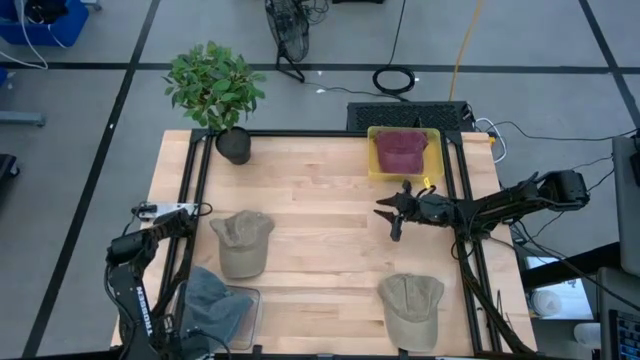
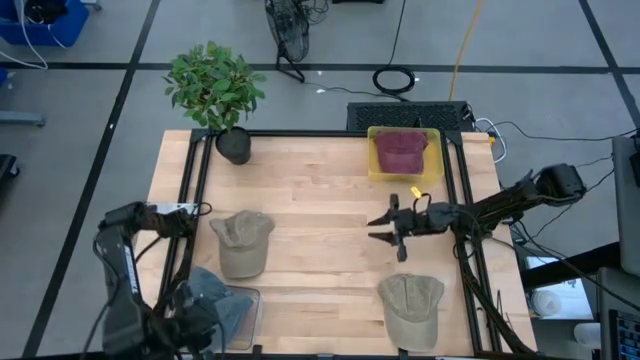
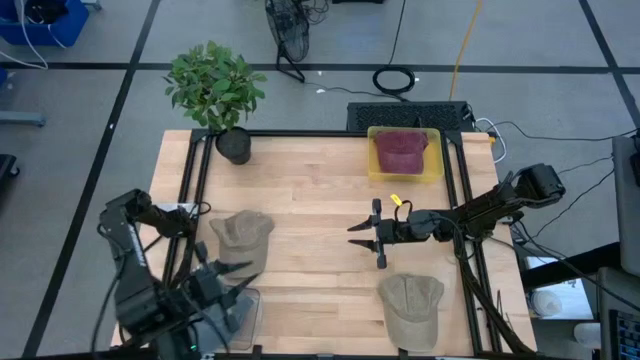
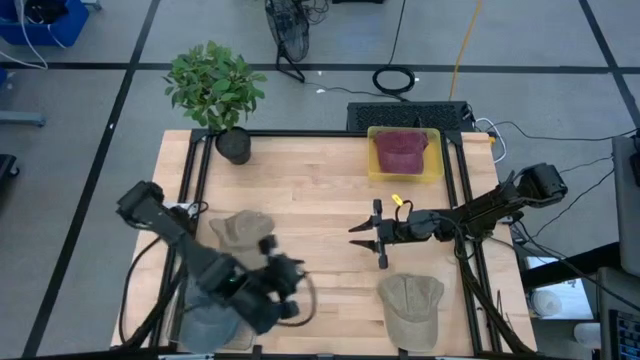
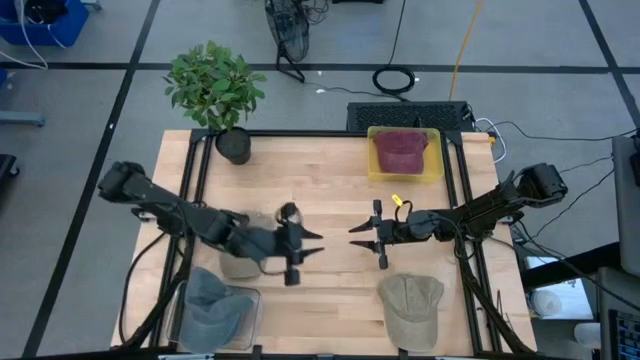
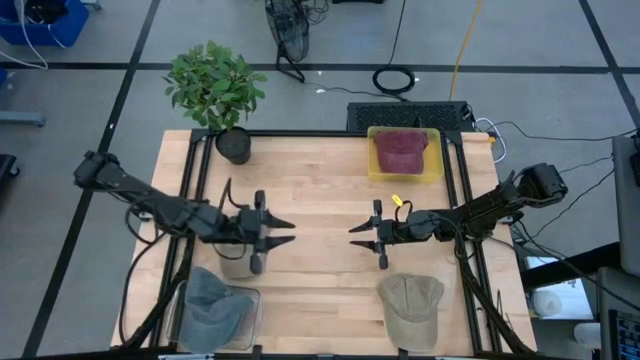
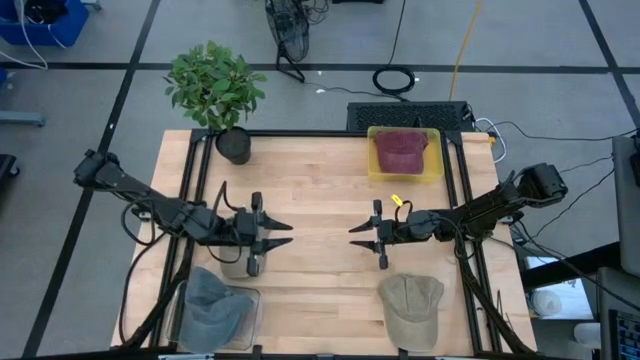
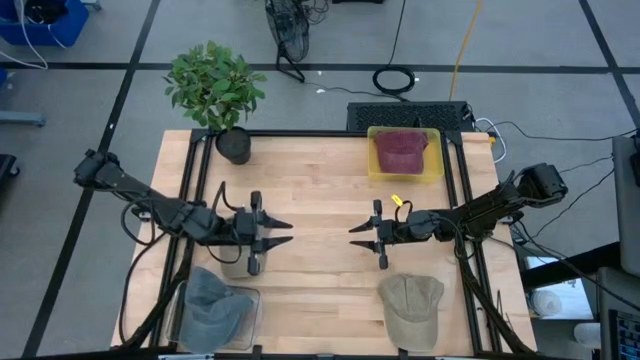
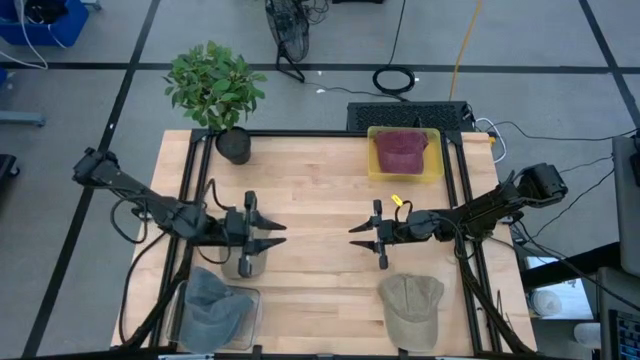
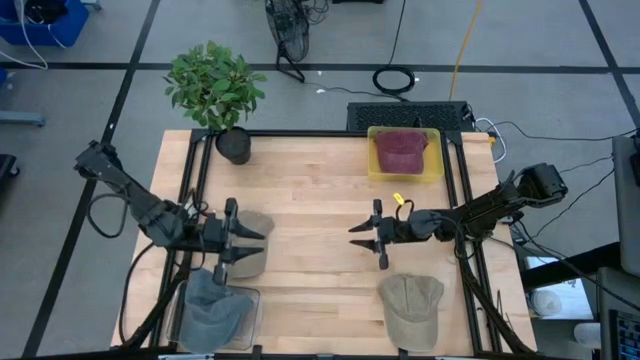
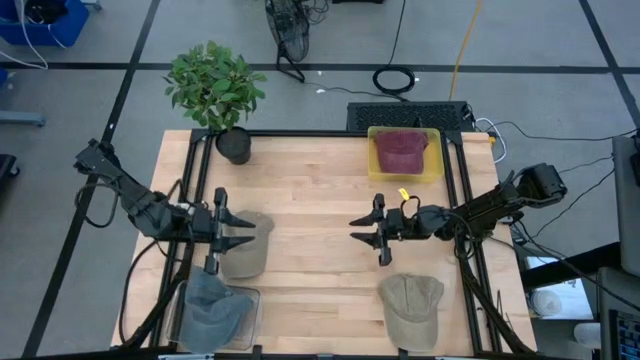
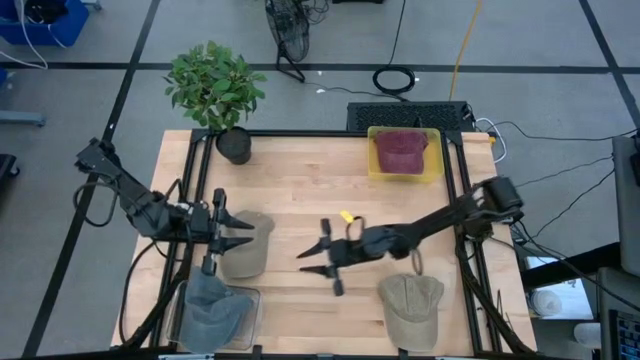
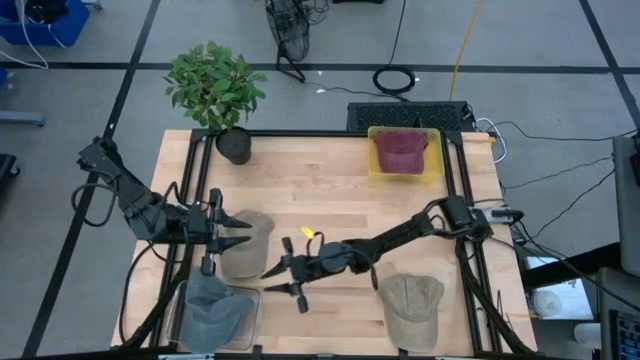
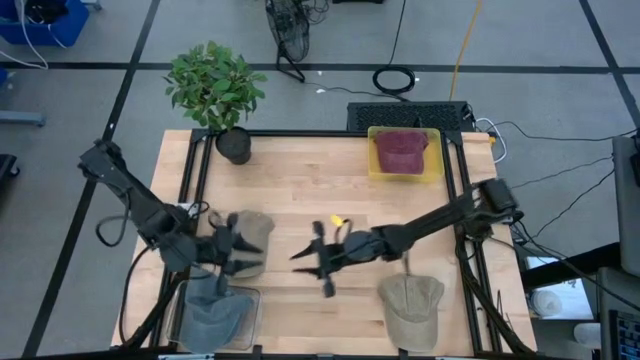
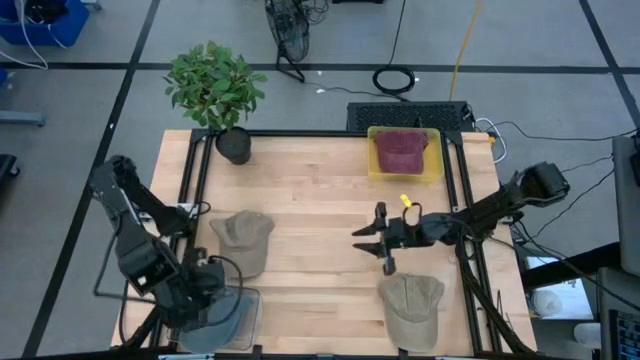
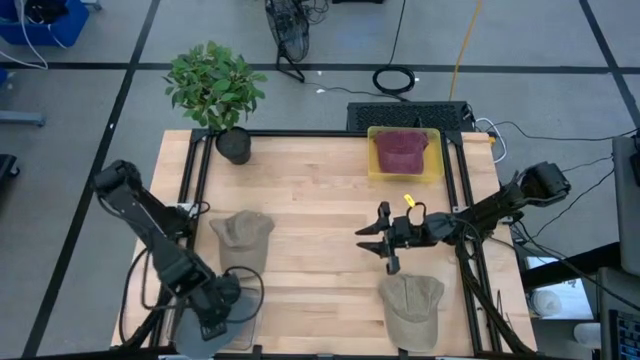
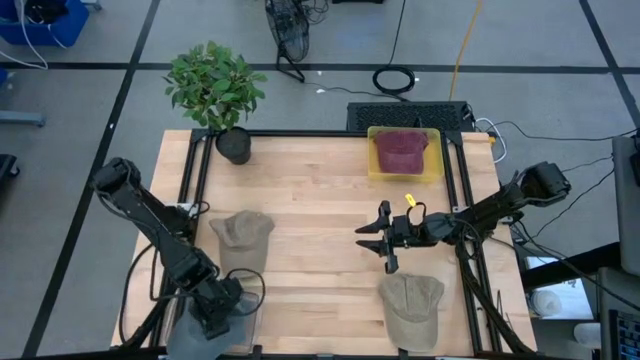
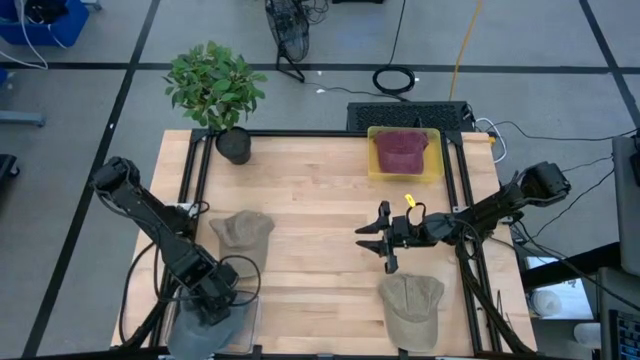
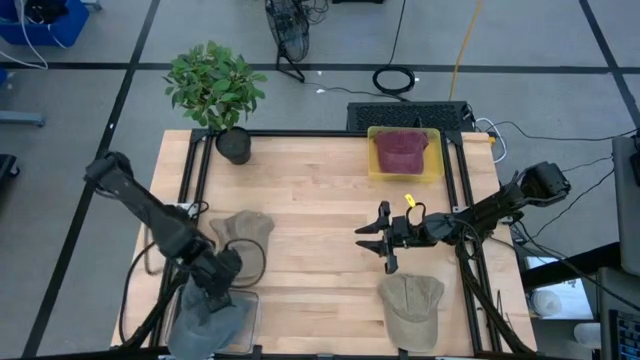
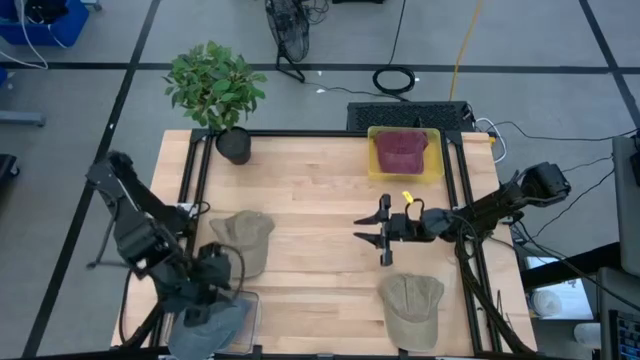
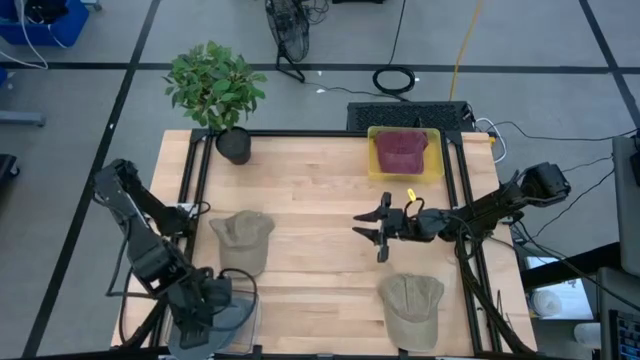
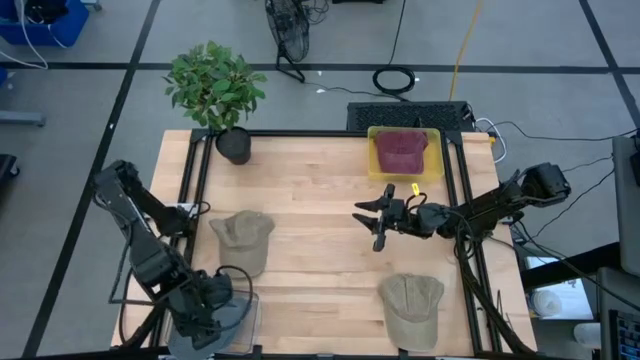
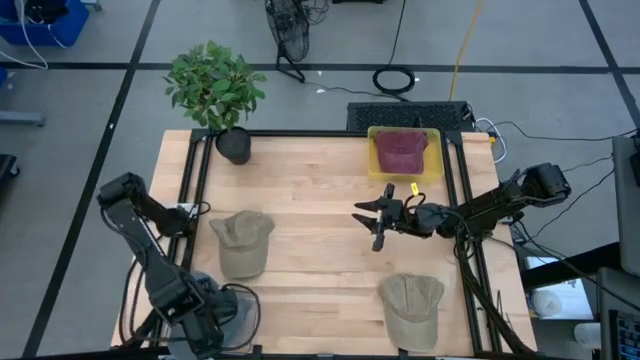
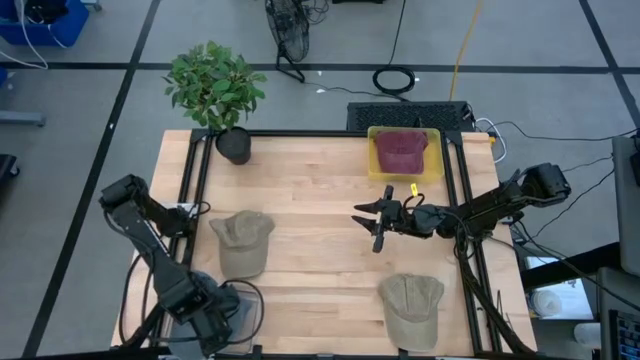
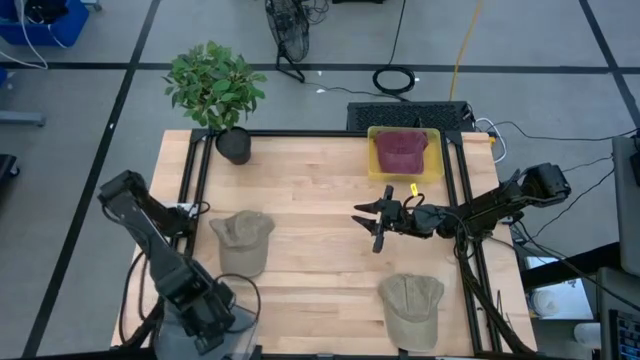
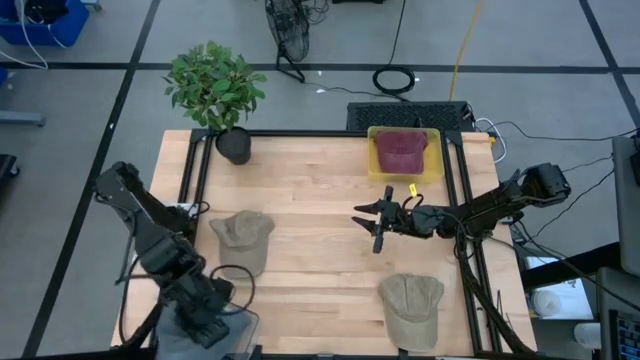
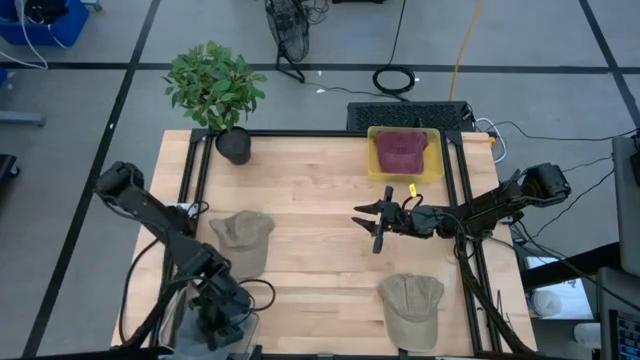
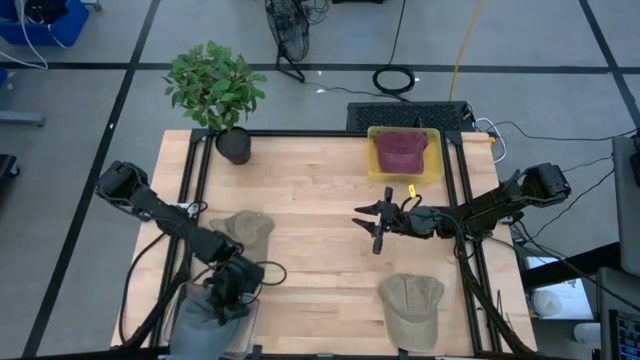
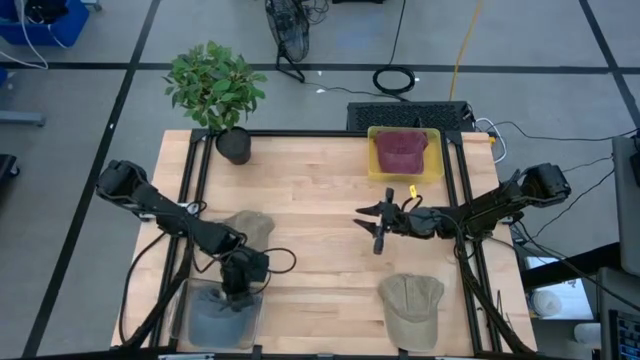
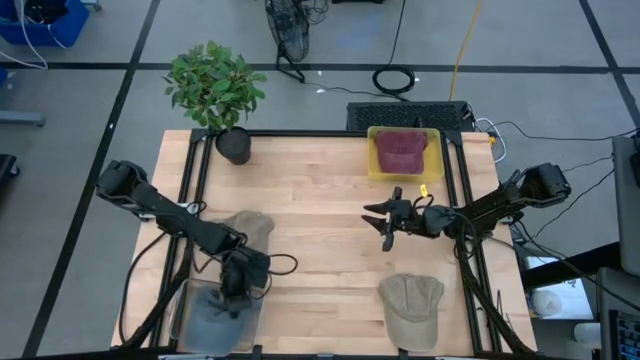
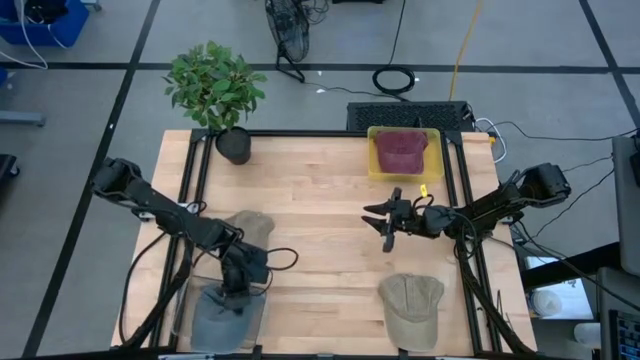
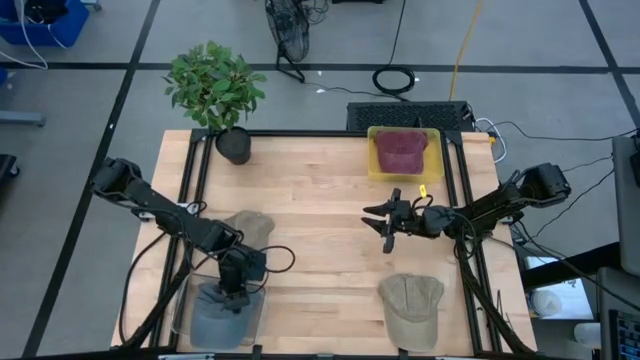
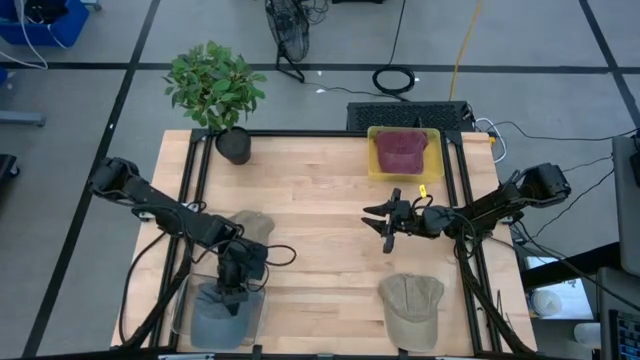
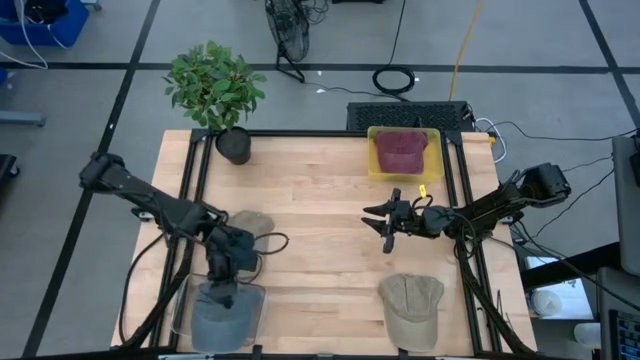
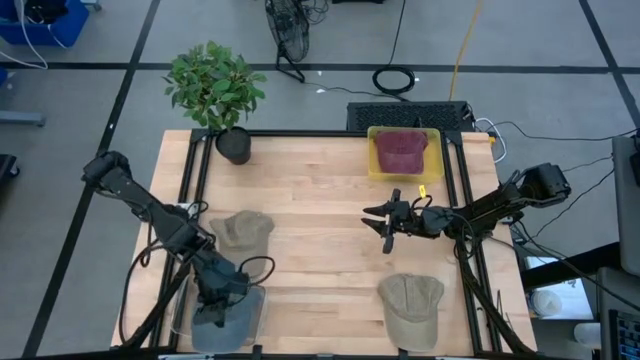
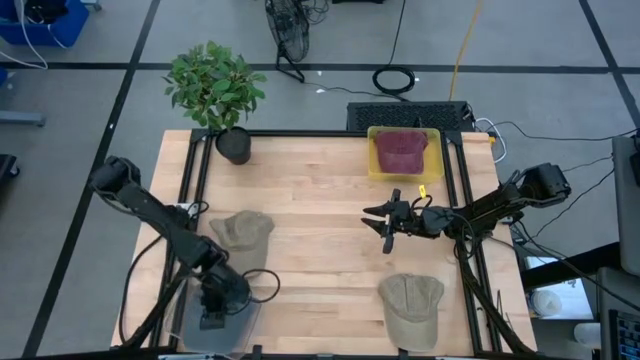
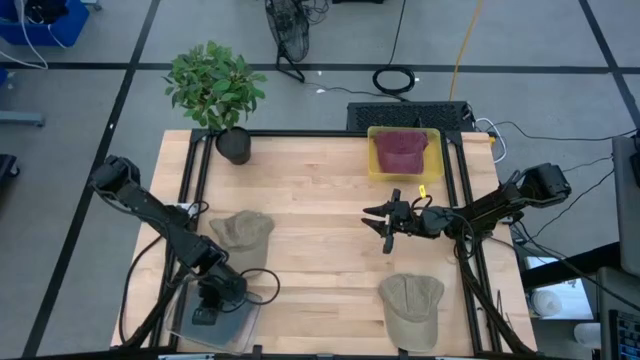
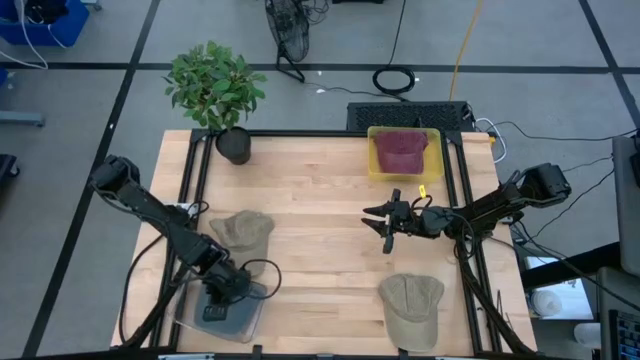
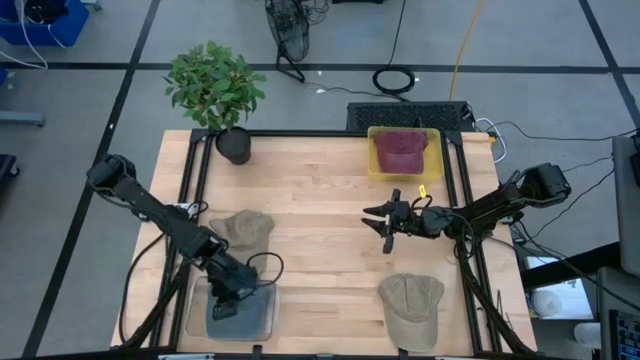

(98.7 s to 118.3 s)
Task: Pick & Place hat
Adjust the gray caps in the transparent bin

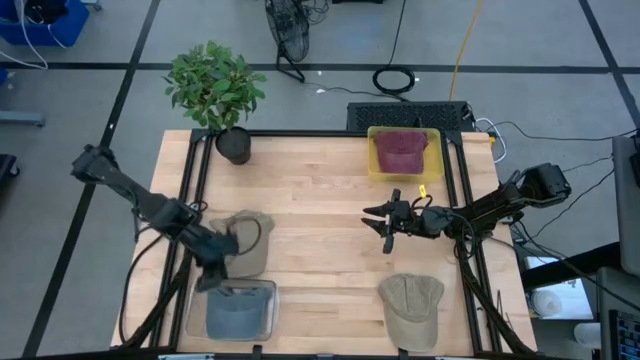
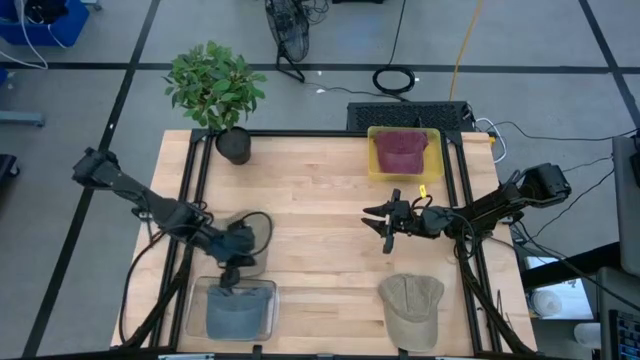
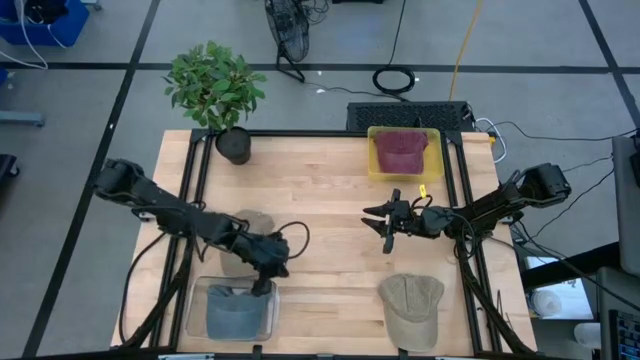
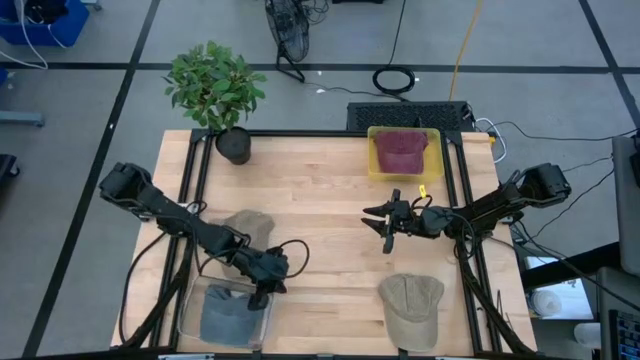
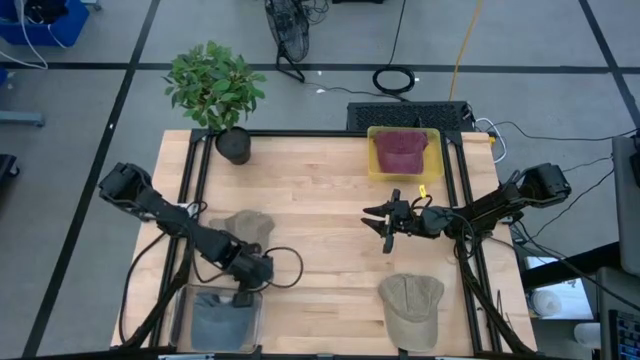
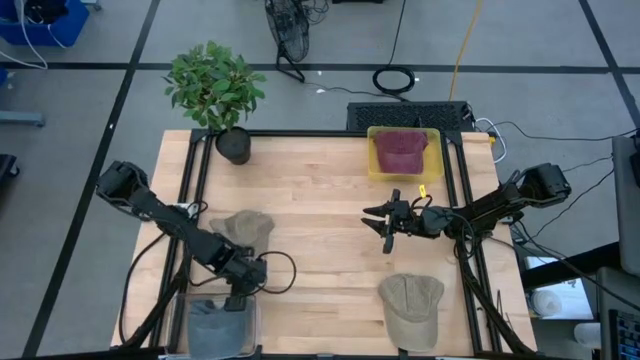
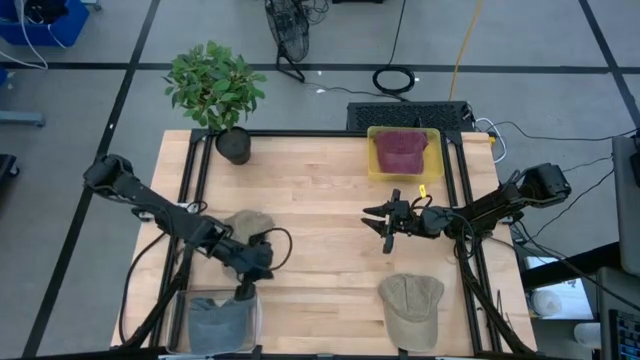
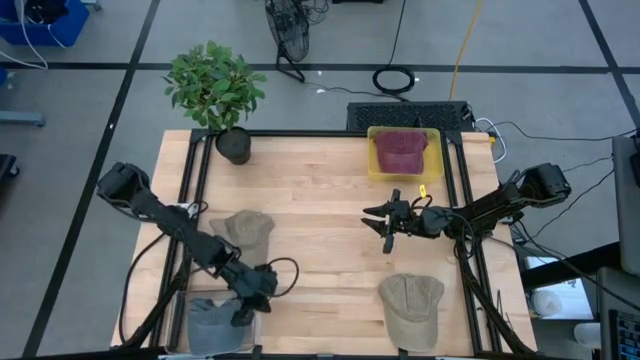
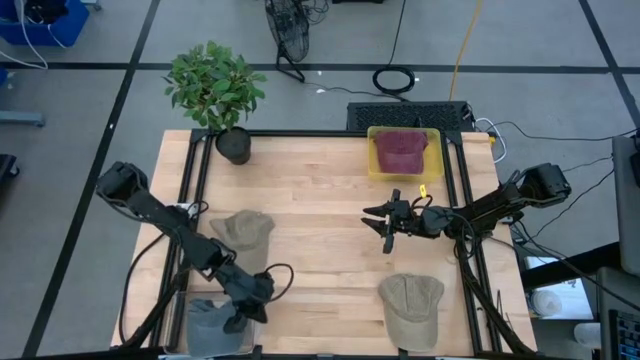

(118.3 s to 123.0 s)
Adjust the transparent bin
